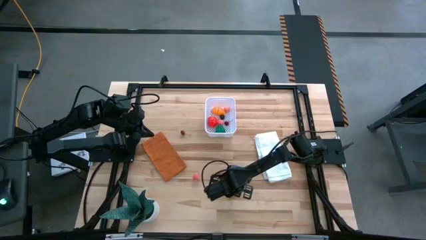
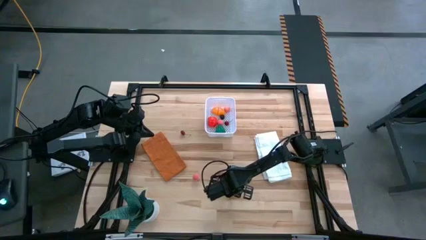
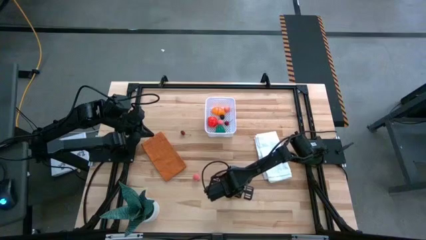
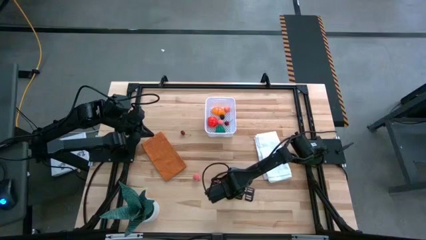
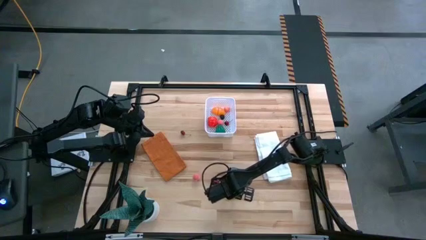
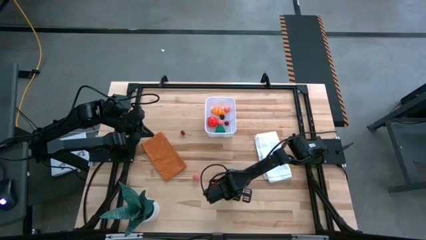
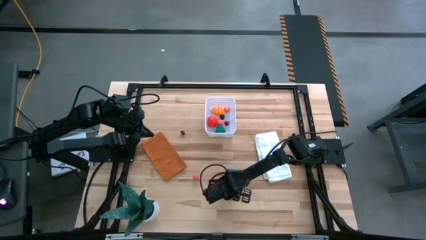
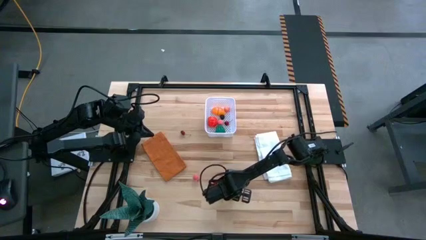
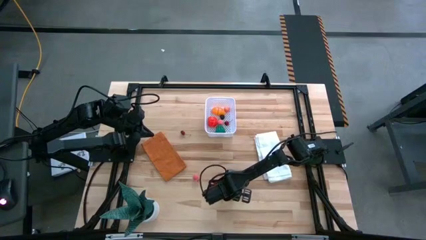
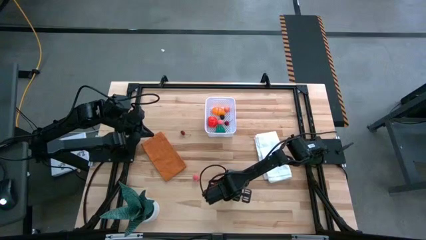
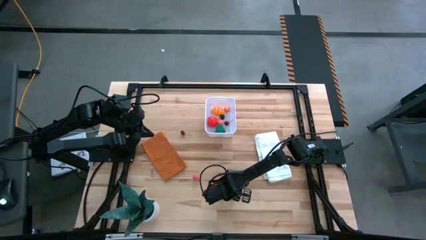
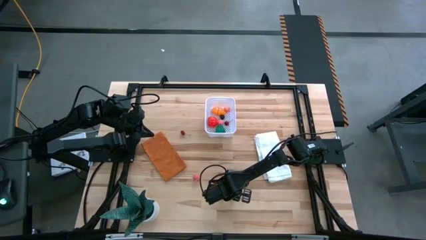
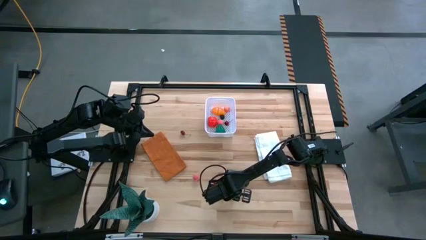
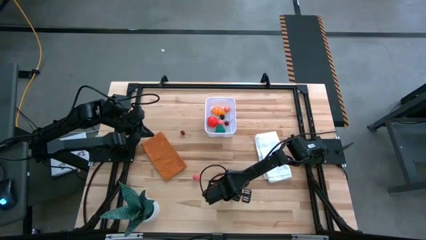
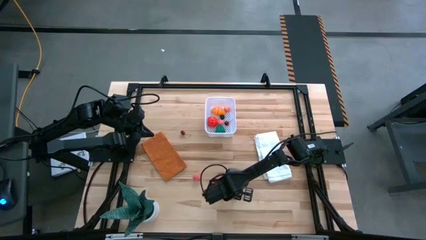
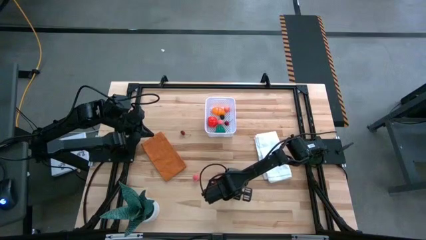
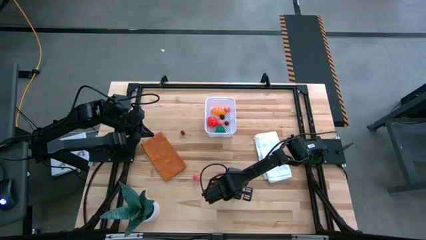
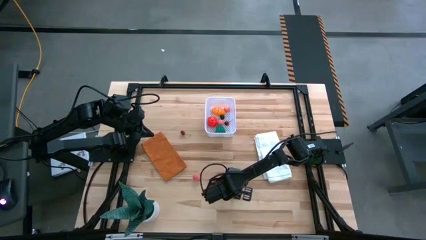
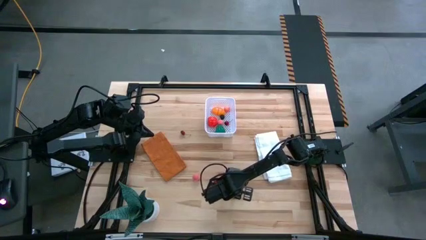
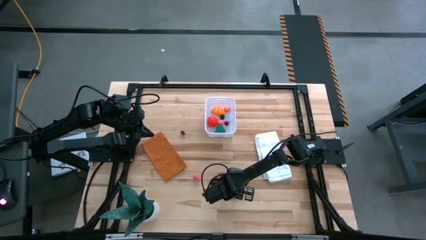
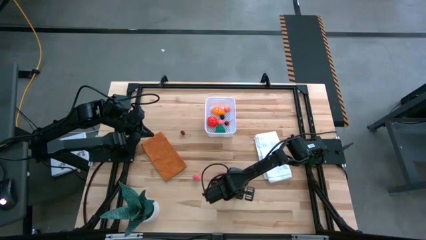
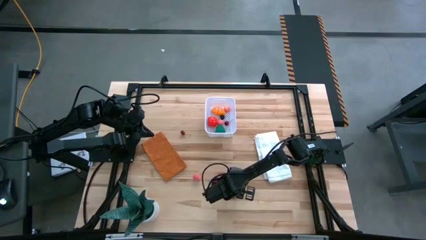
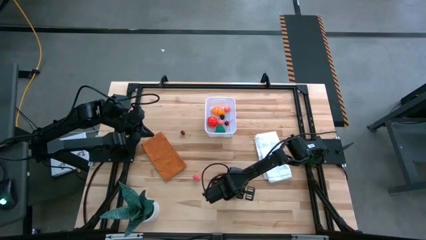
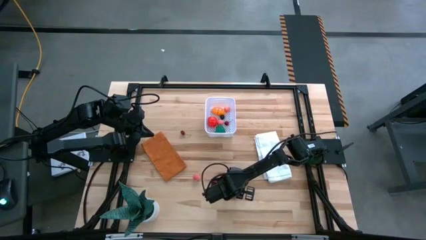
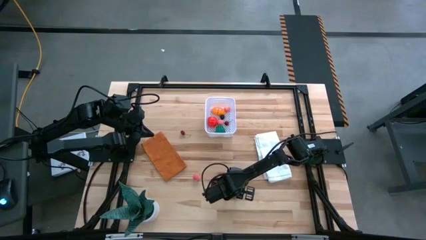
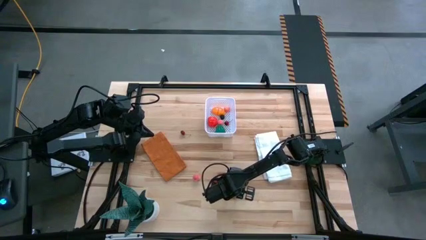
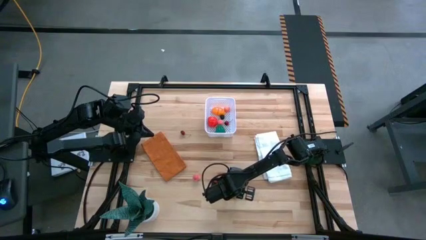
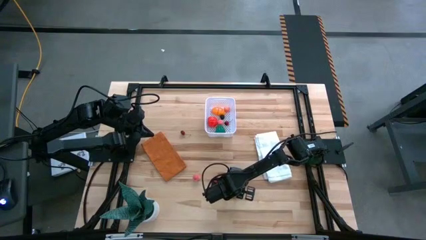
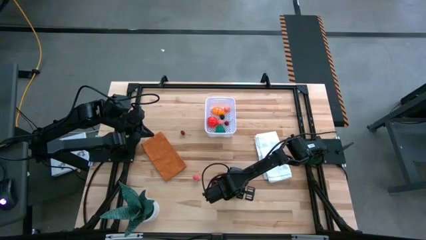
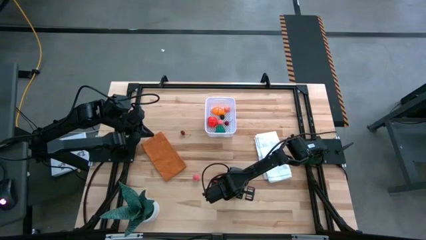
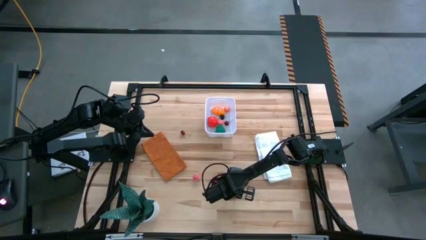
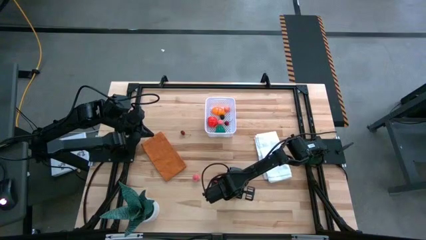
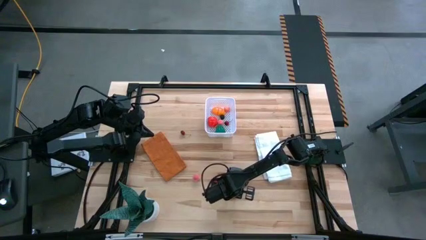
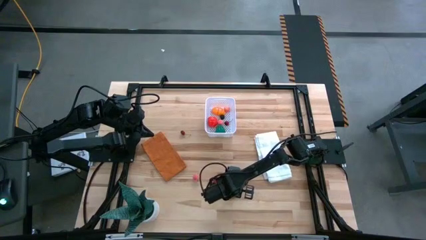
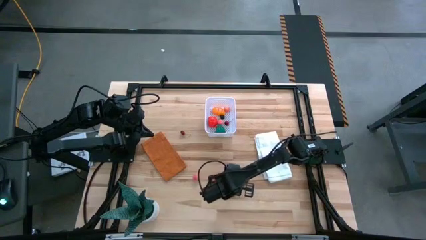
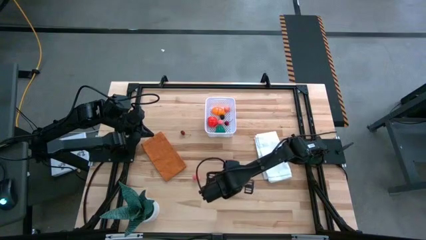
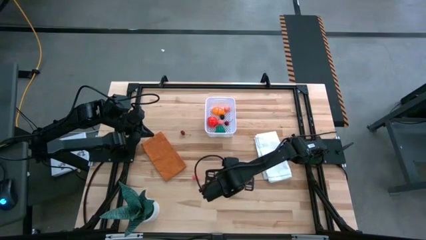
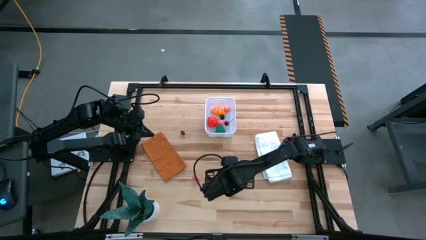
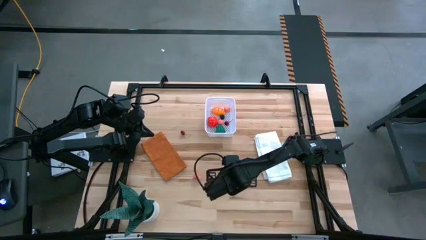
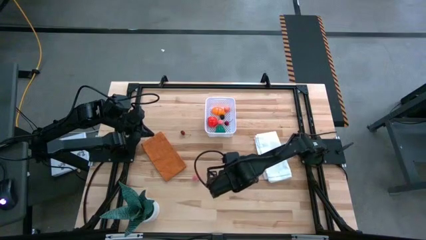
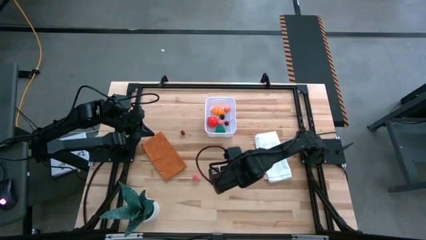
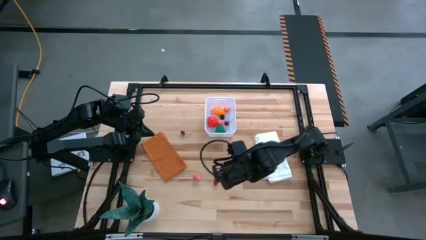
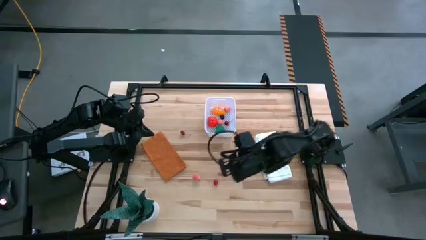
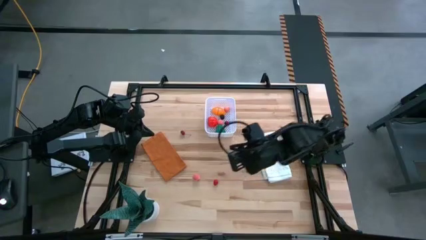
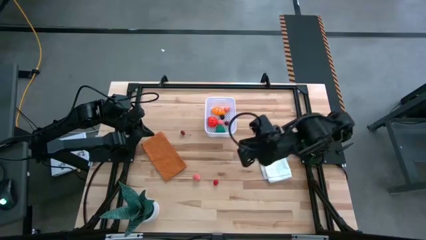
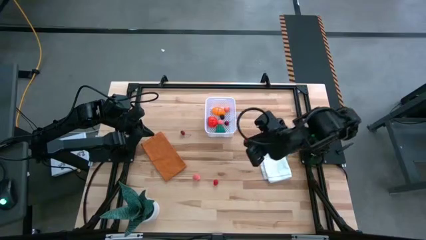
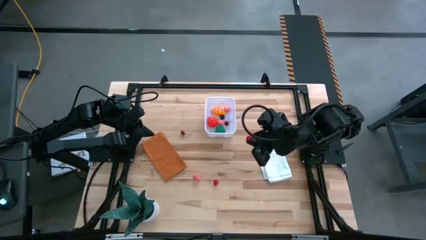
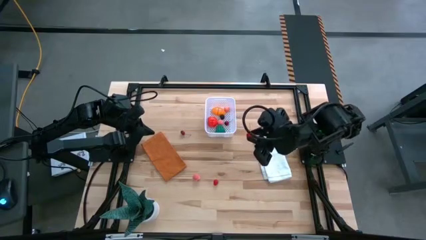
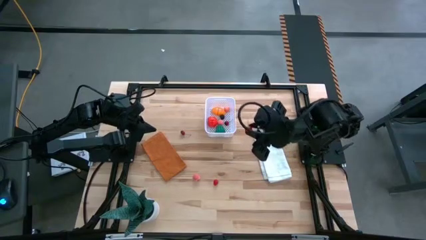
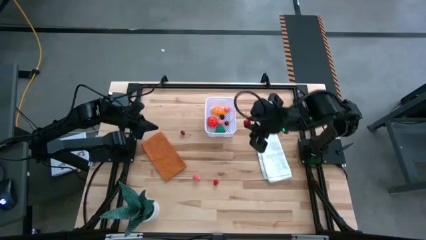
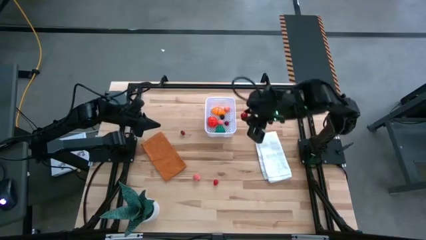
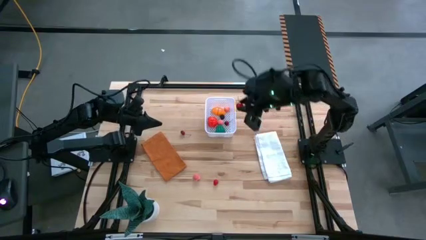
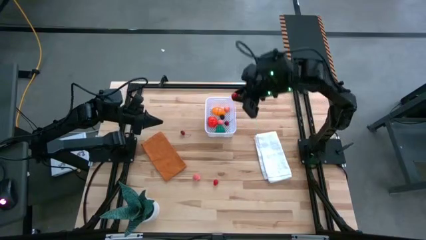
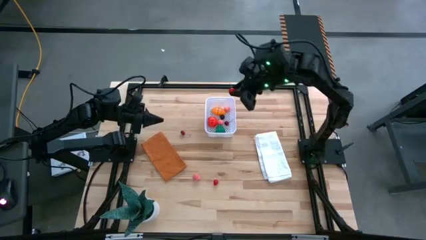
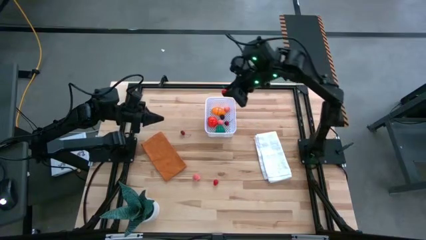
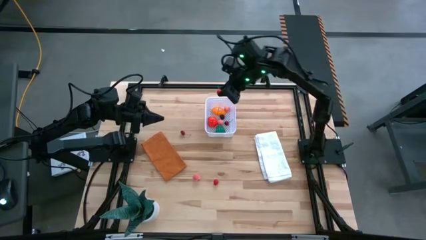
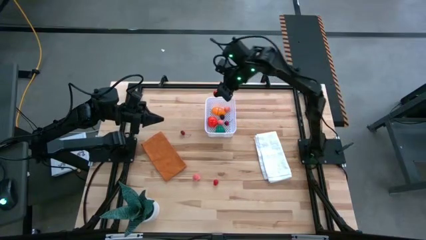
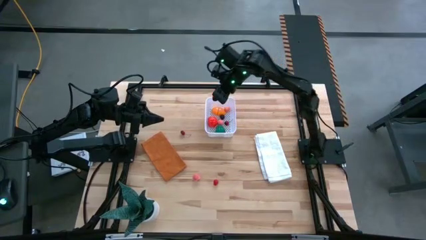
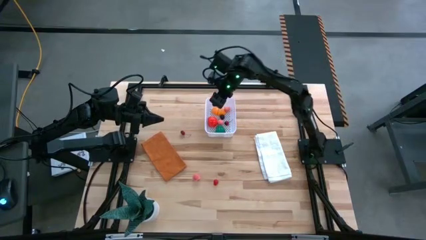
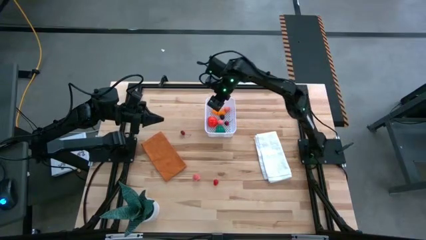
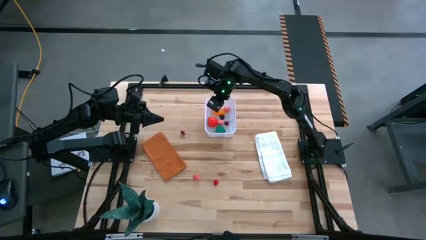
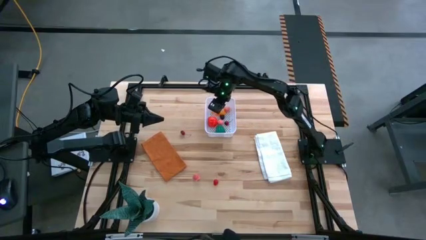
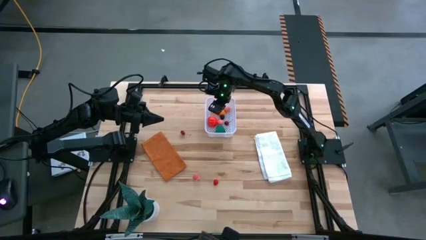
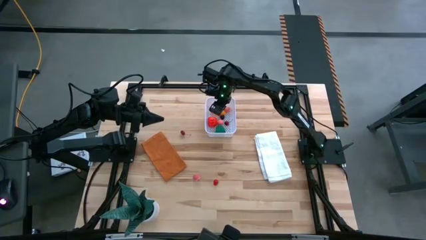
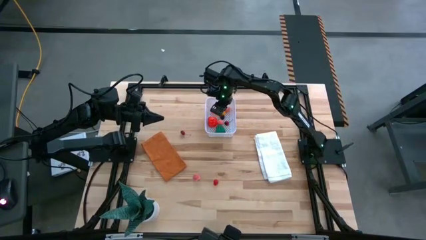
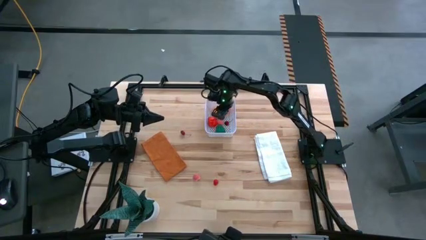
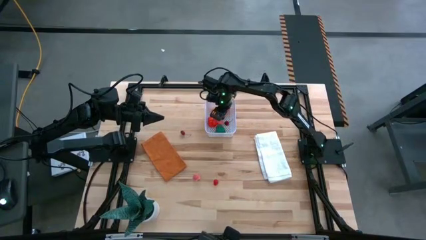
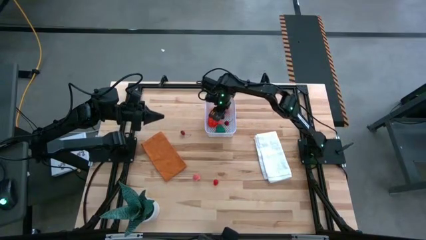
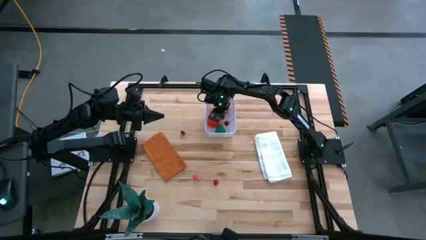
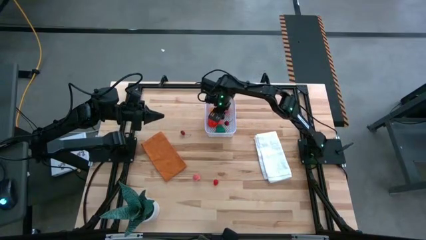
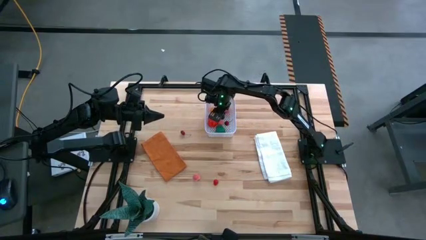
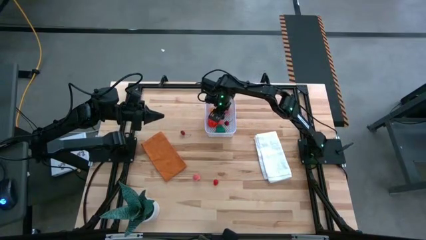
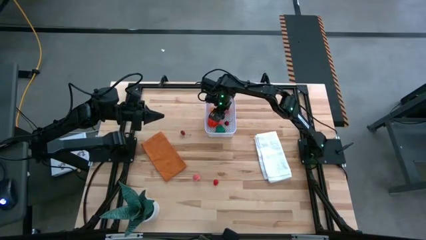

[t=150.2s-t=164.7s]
Task: Pick and placing Produce into tupperware
Put the red cherry into the white bin

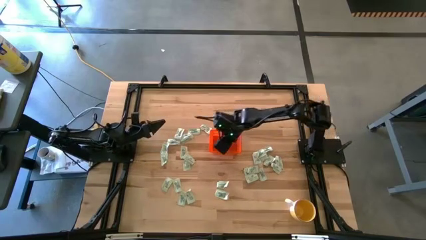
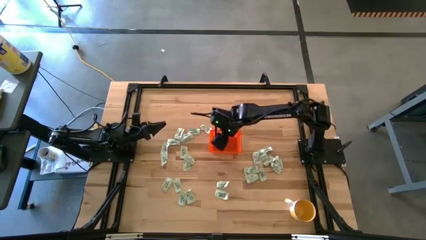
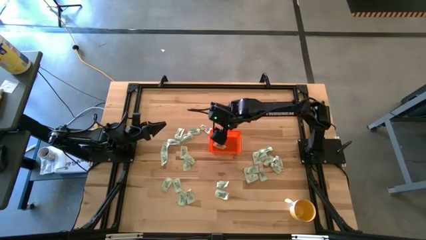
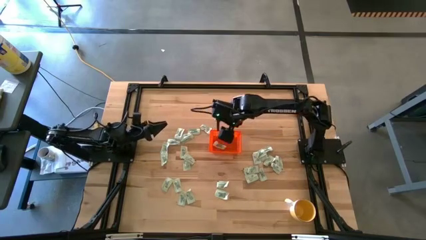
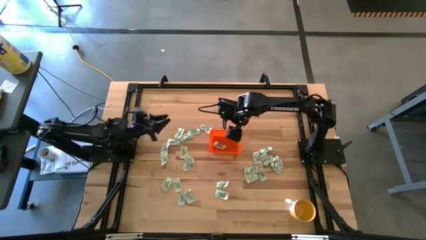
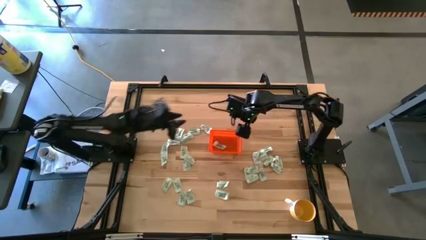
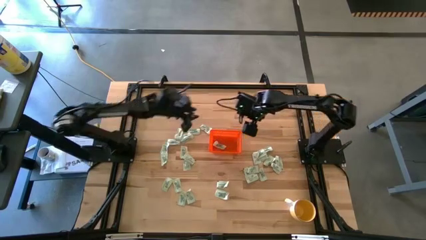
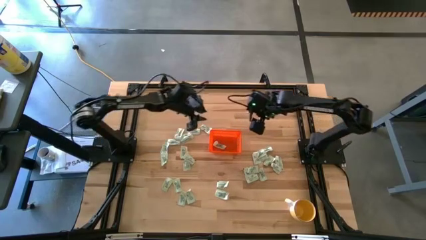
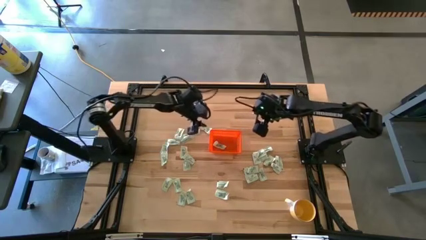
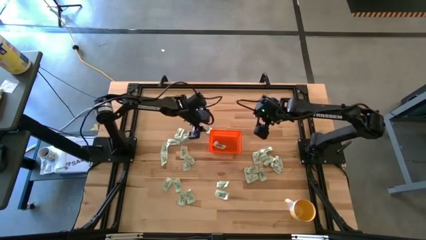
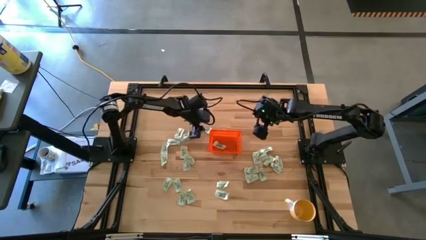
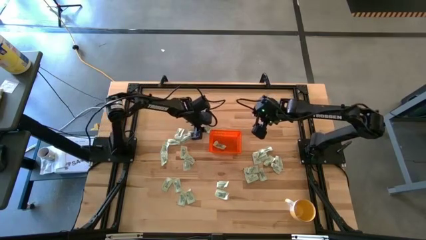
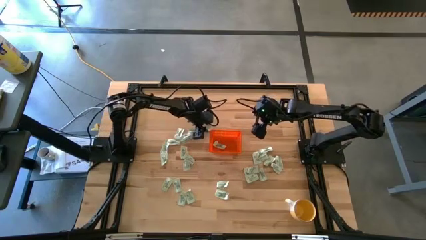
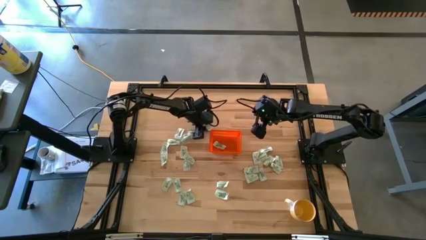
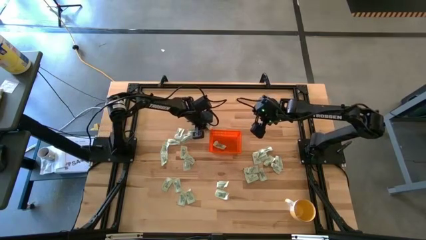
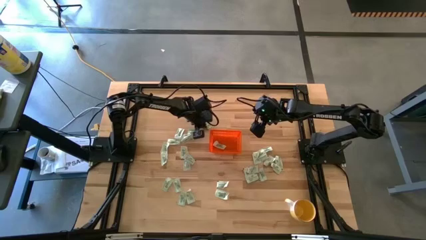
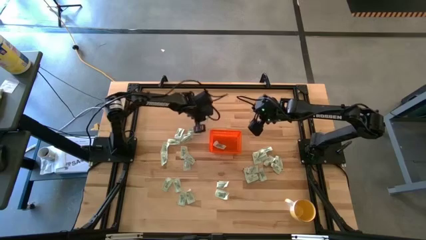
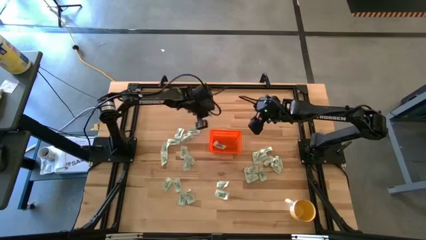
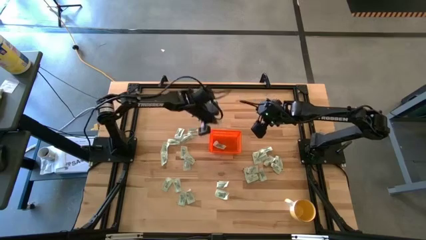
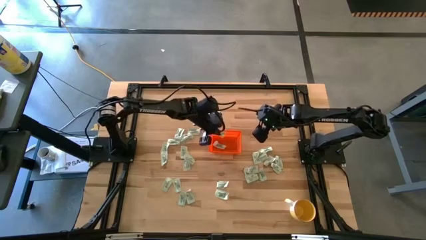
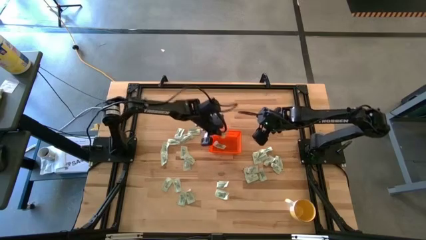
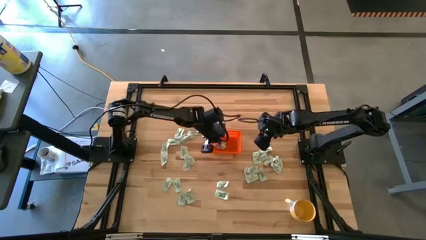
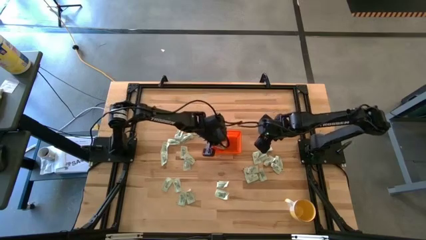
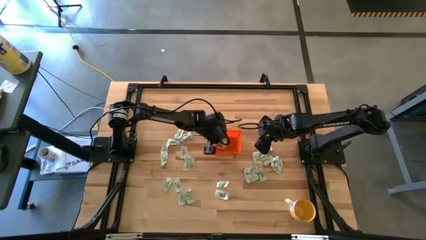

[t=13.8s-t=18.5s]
Task: Pick and place Stevia / Truvia into bins
Put the light green stevia packet into the orange basket
